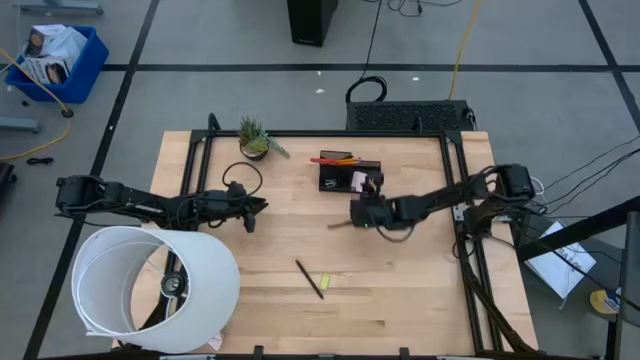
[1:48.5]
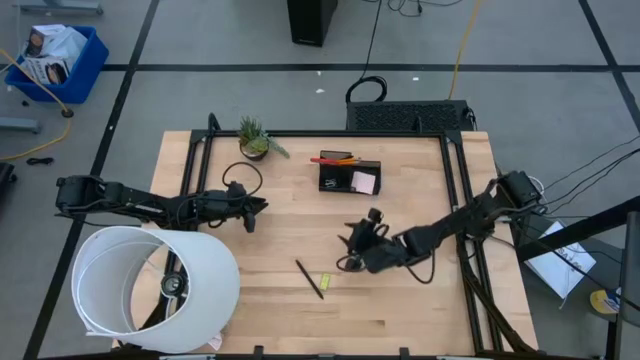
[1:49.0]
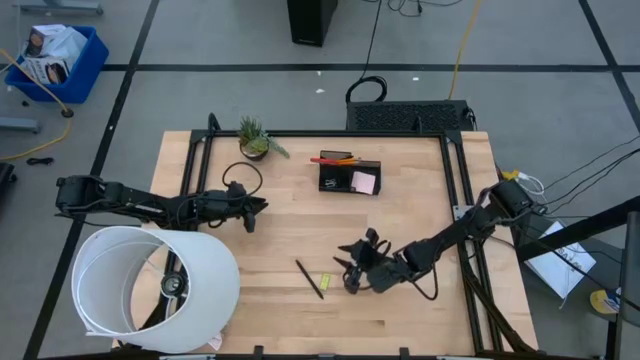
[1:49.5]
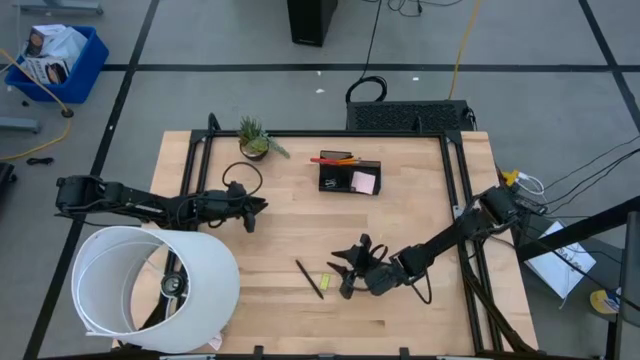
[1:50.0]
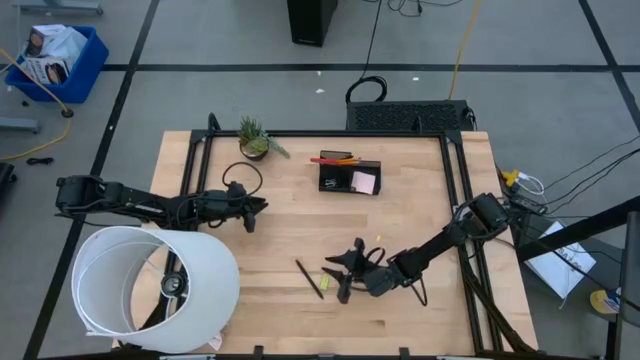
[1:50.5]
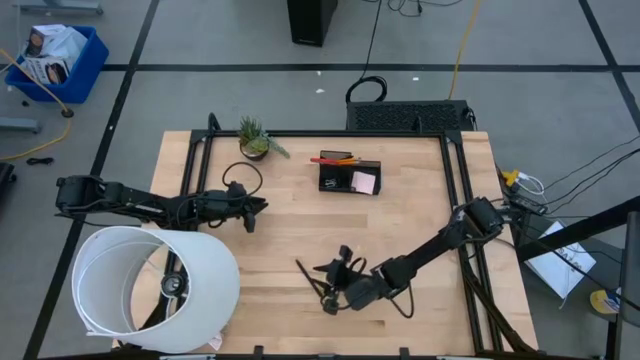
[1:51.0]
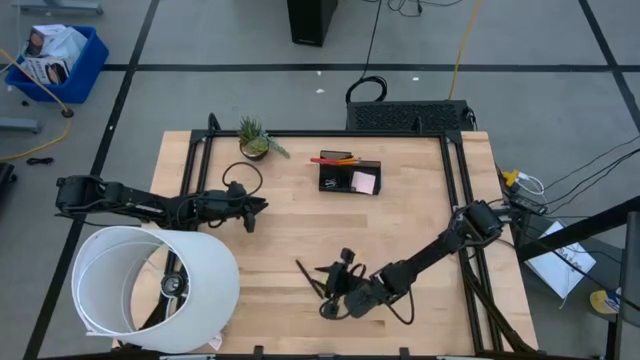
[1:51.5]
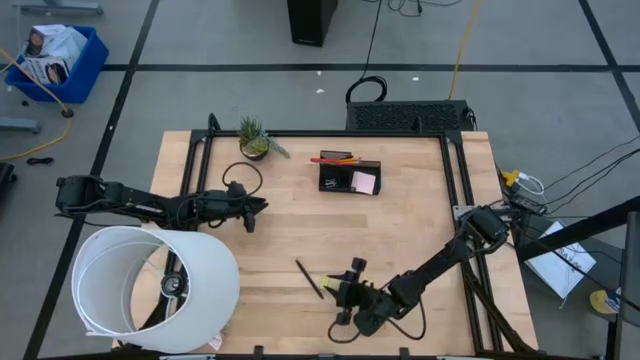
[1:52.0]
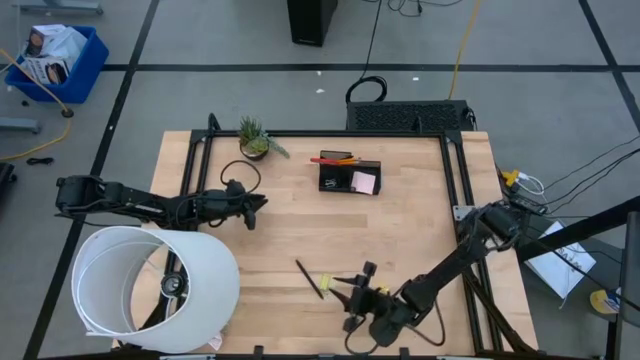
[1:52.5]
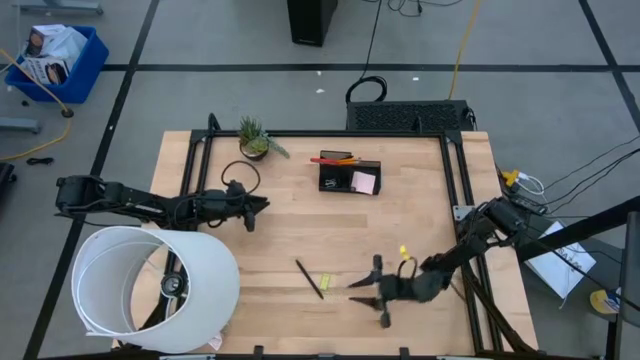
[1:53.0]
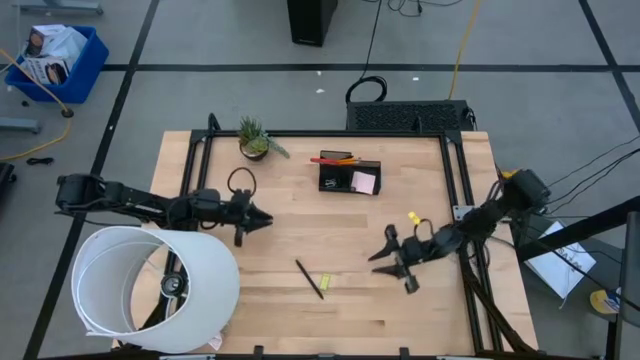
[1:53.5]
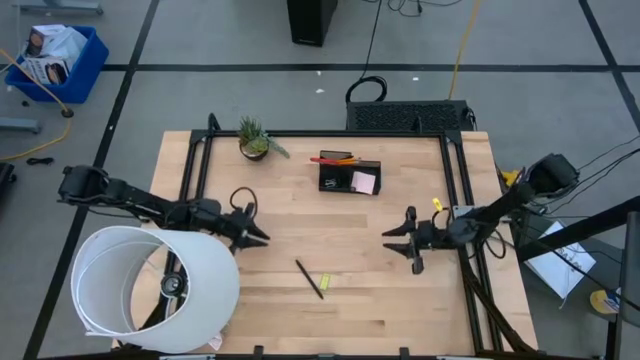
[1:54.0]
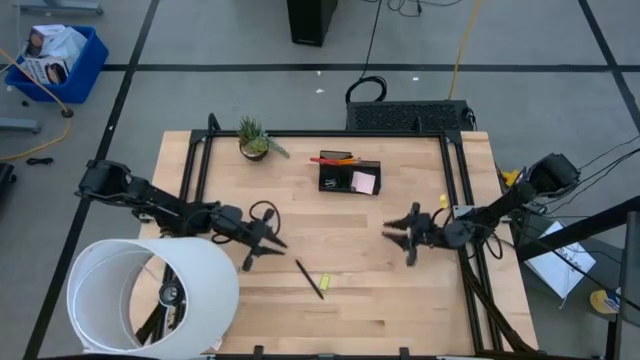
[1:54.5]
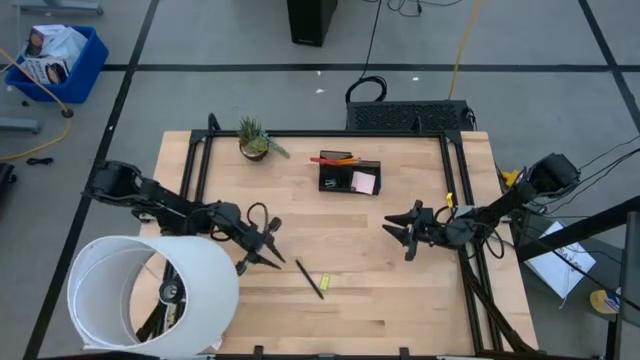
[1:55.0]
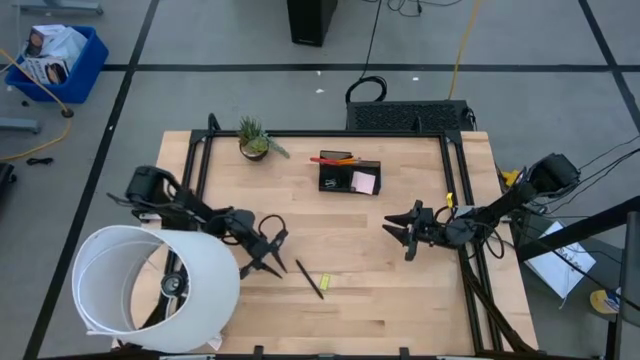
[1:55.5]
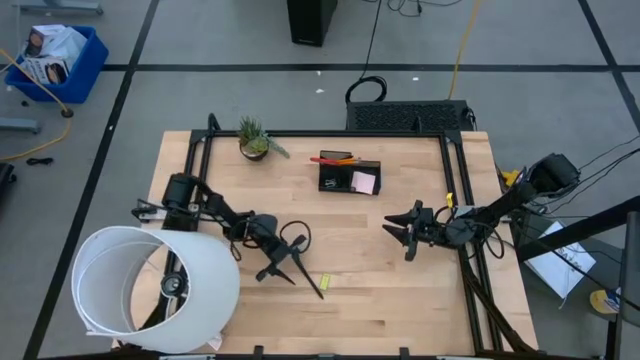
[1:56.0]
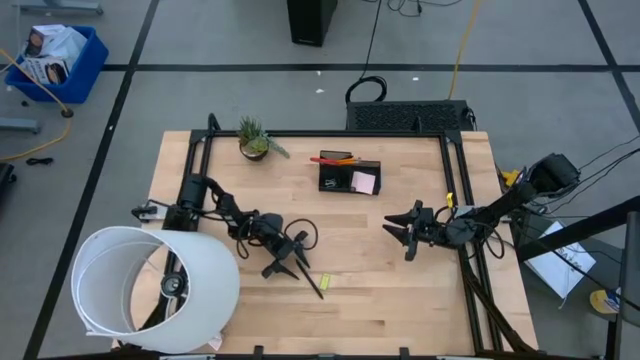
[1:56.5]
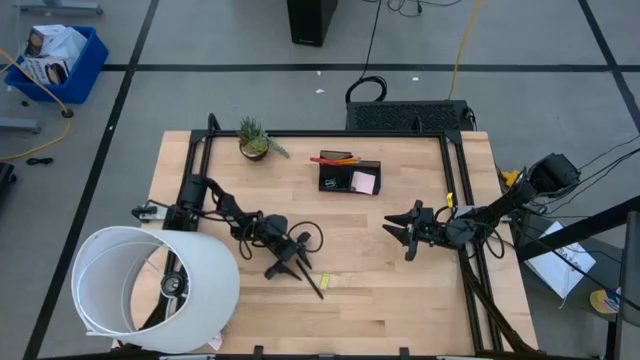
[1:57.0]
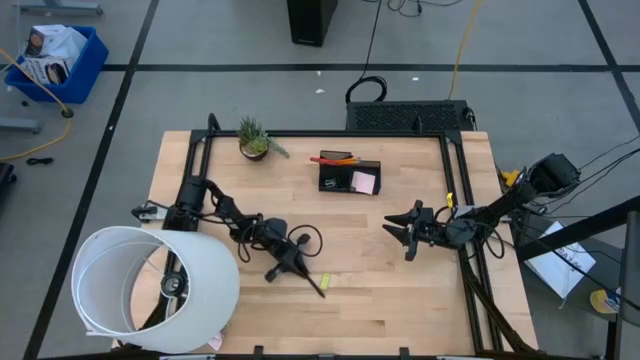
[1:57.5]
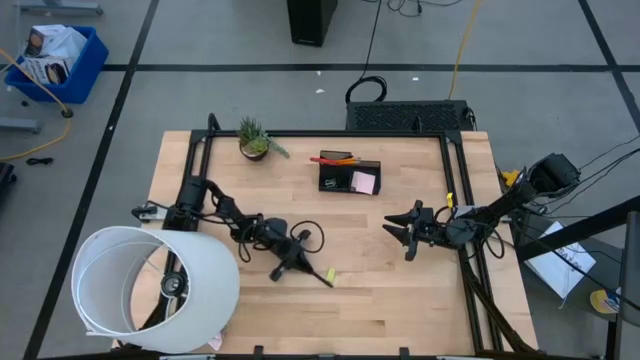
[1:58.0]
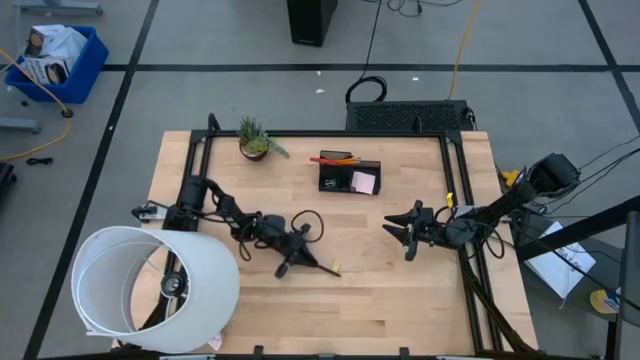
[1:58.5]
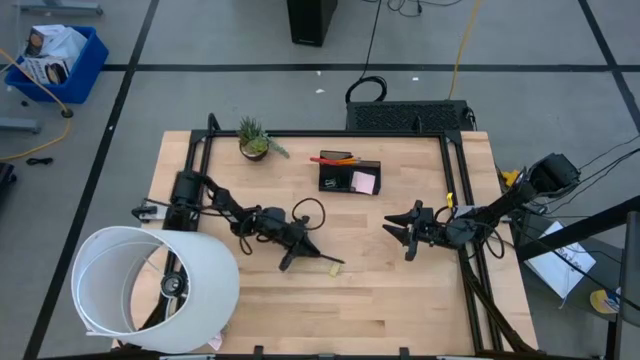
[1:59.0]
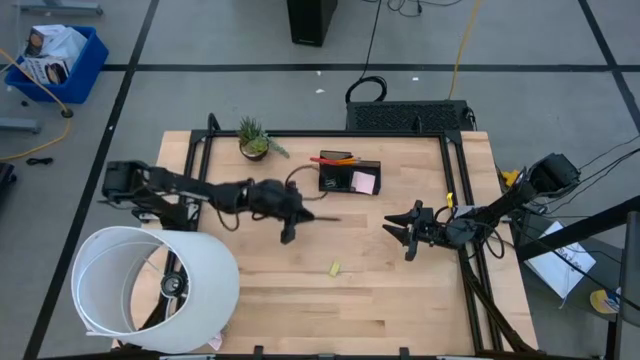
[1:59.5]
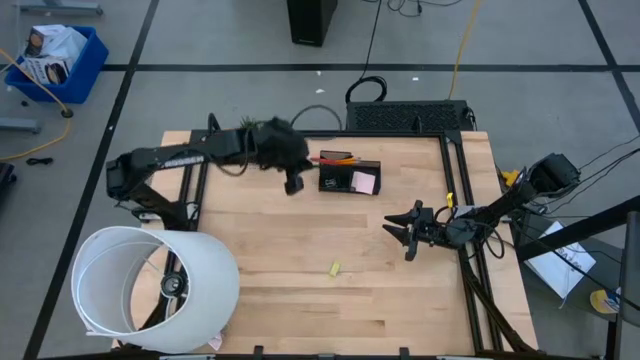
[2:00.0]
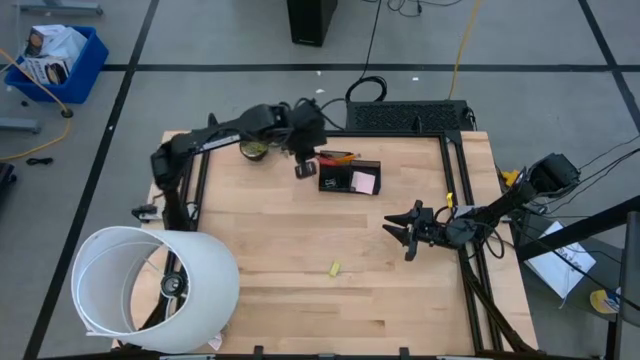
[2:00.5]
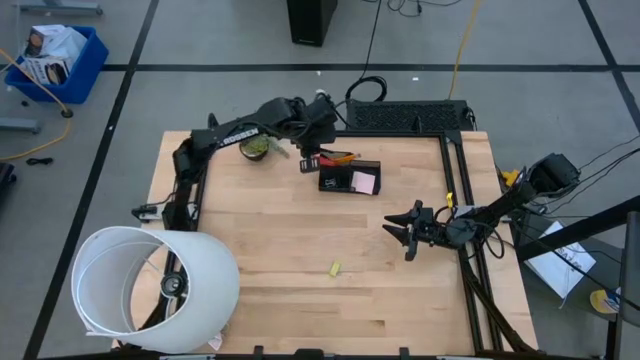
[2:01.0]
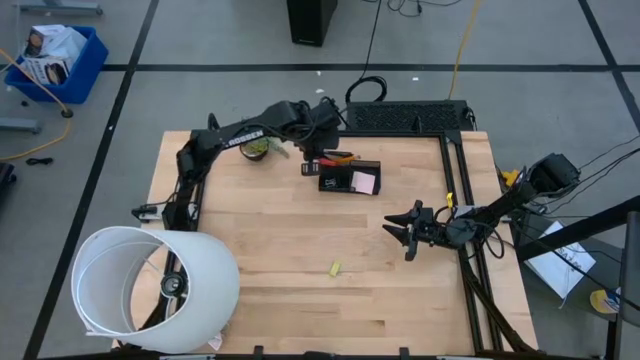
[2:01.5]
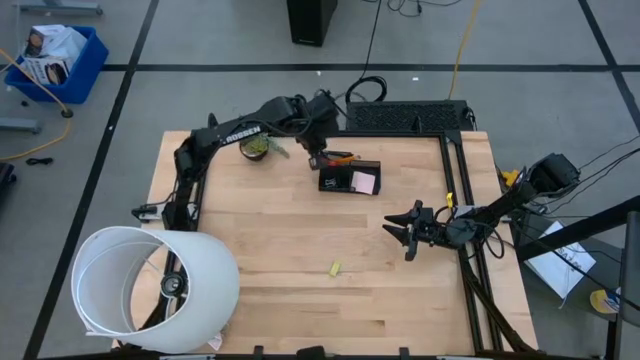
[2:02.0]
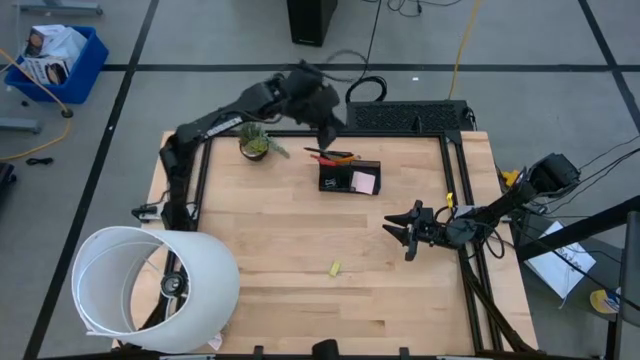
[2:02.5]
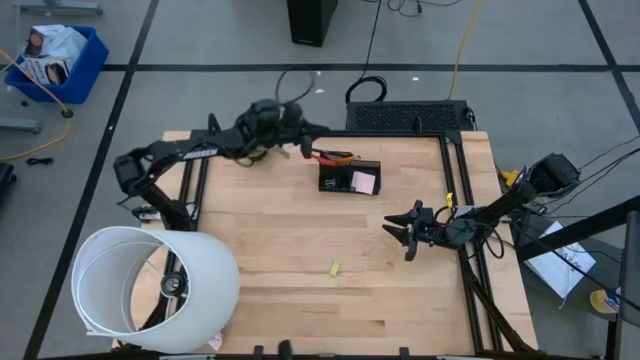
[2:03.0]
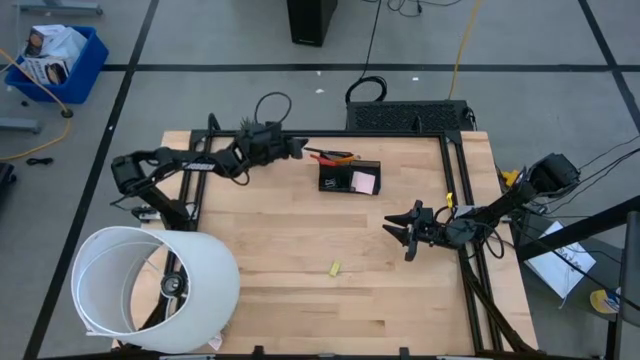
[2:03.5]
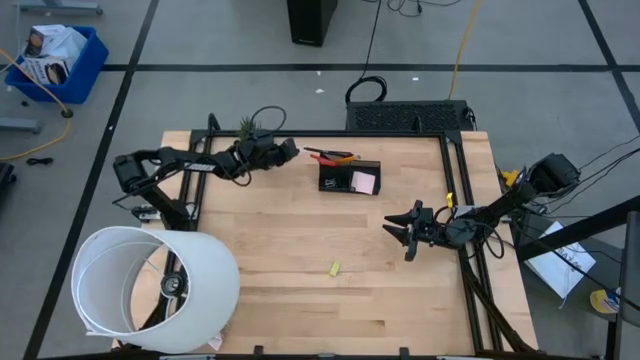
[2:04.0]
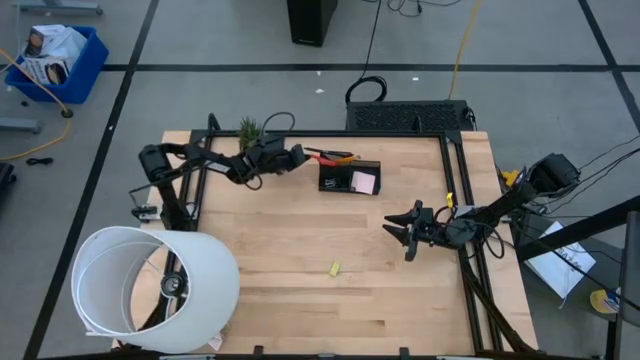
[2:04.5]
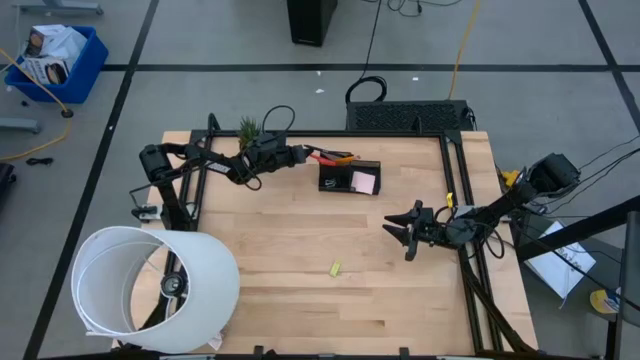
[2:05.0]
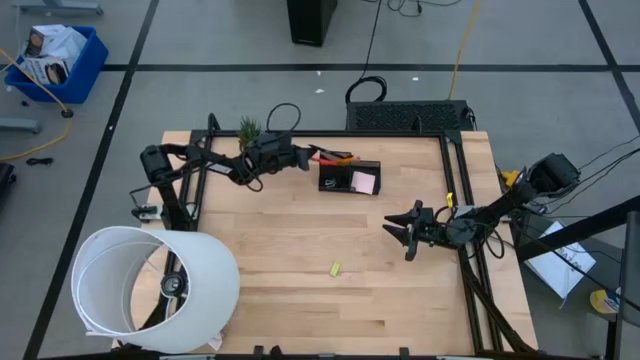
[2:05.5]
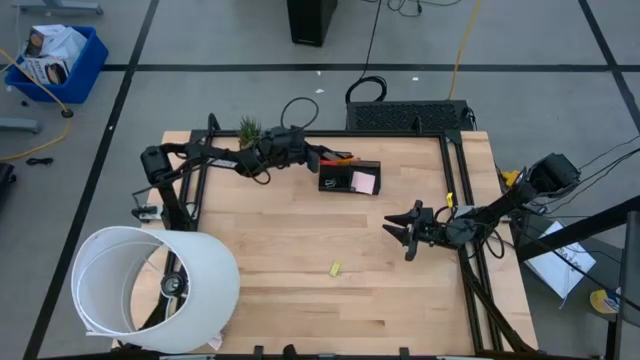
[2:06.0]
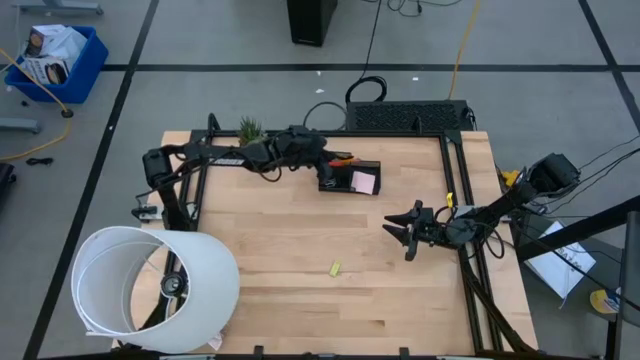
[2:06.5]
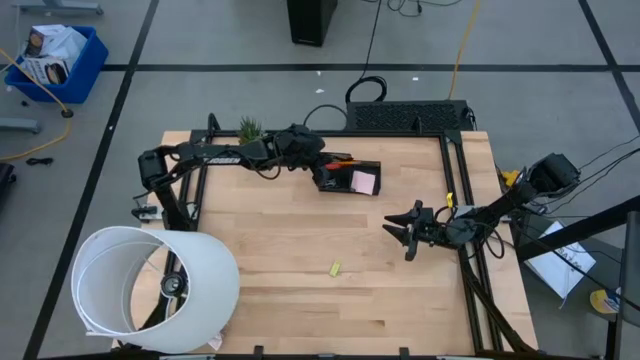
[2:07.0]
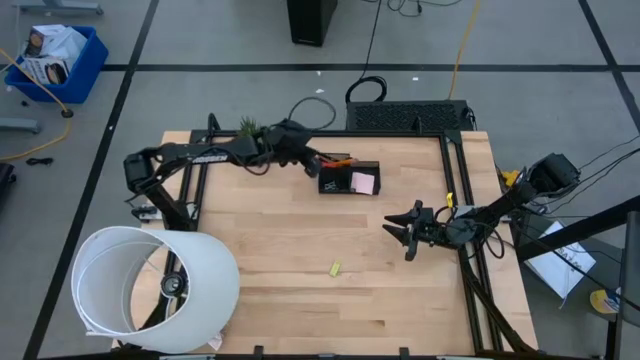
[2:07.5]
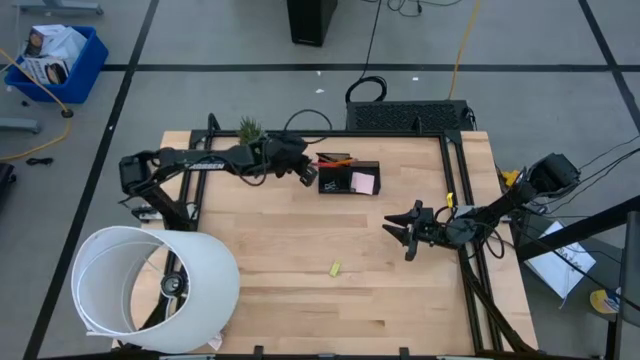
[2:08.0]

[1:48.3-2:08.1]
Task: Pick and place office supplies into organizer
Put the black pen into the desk organizer
